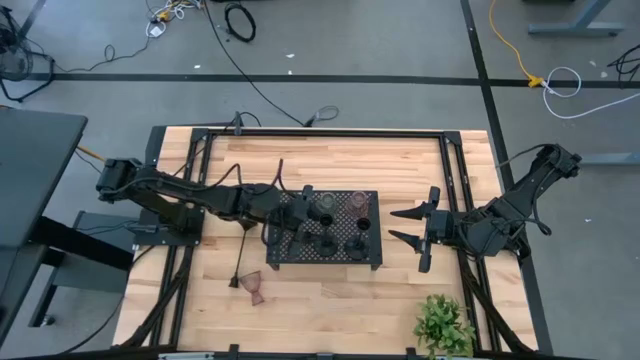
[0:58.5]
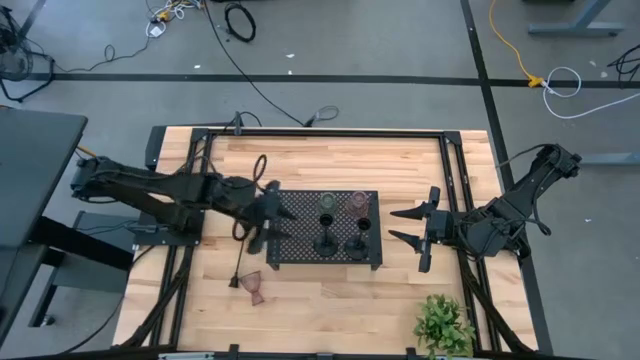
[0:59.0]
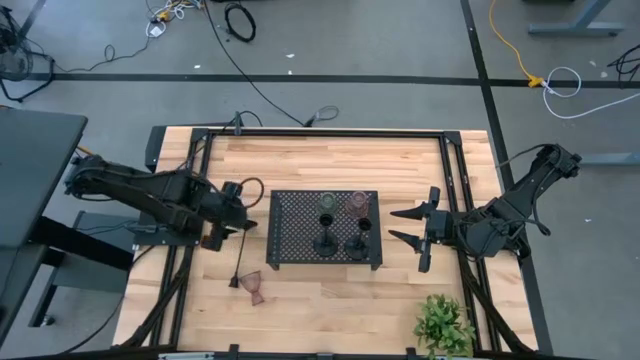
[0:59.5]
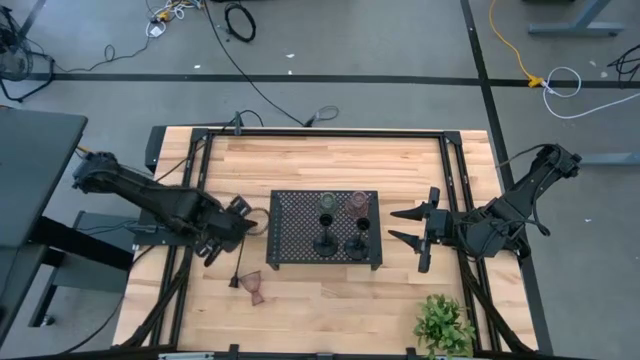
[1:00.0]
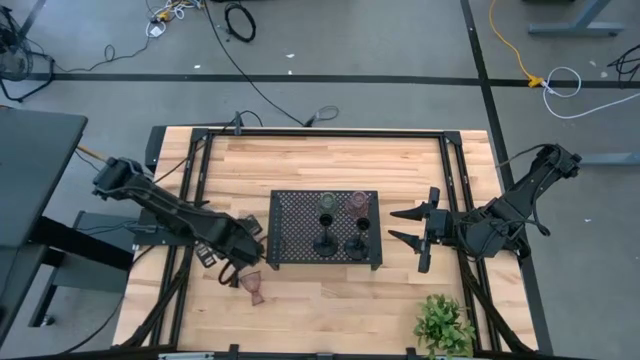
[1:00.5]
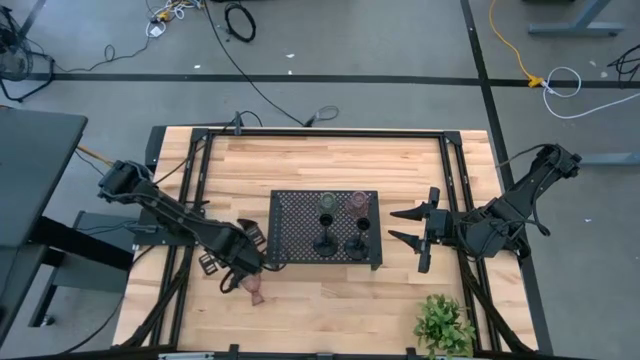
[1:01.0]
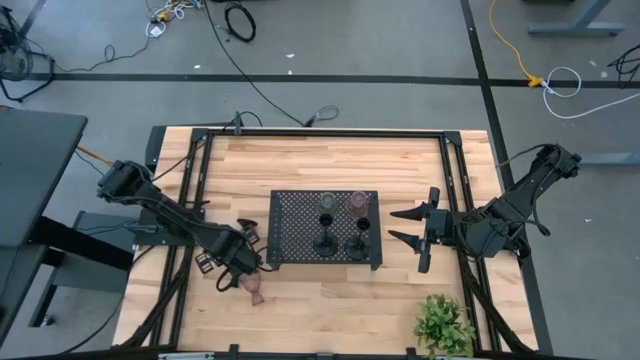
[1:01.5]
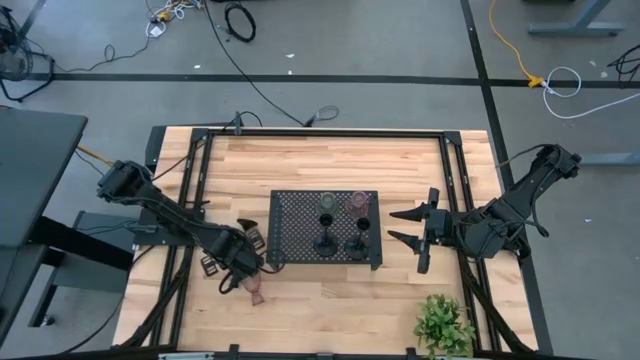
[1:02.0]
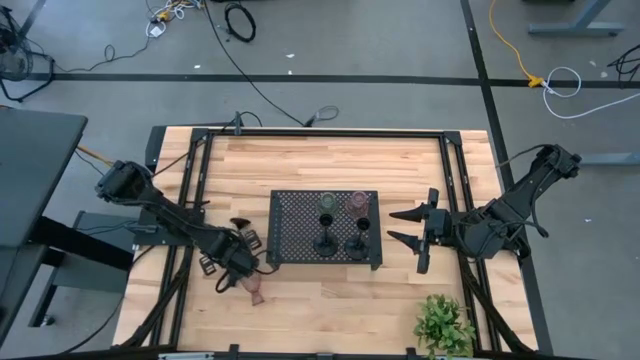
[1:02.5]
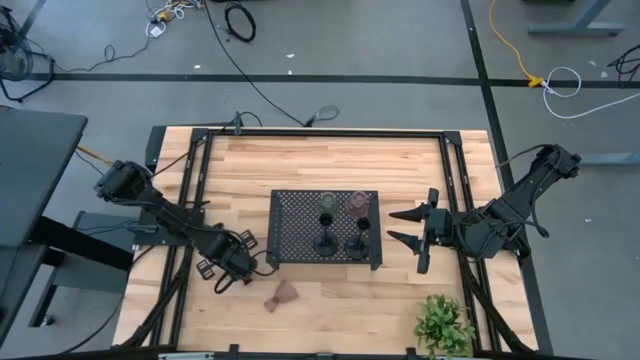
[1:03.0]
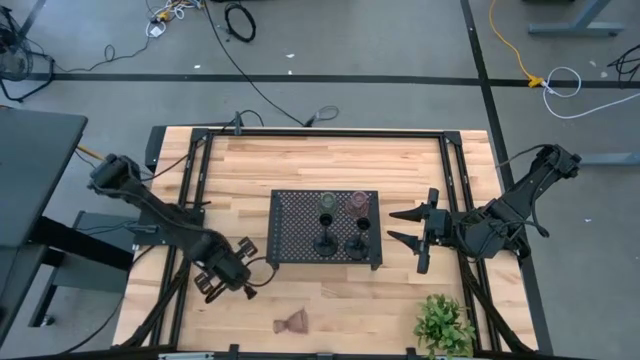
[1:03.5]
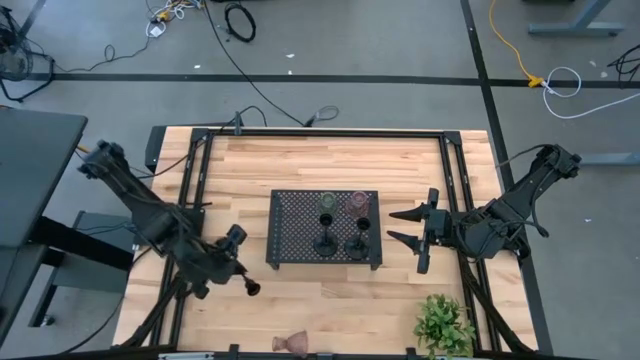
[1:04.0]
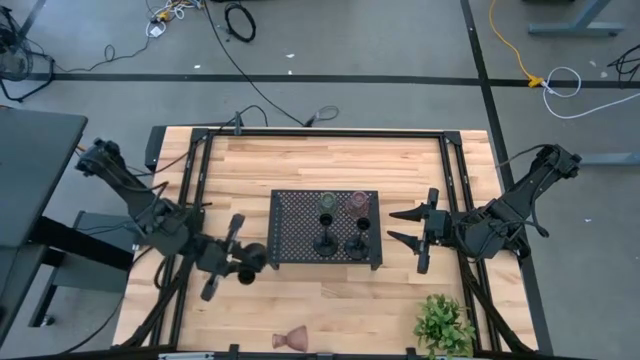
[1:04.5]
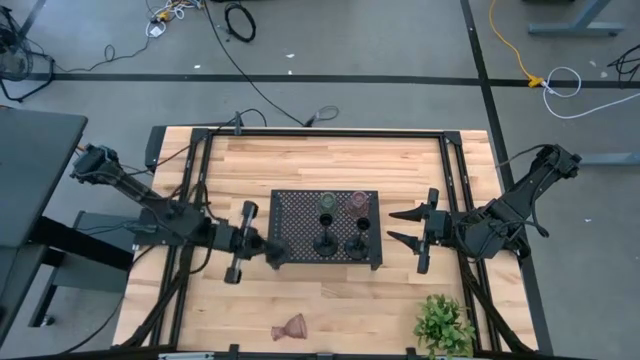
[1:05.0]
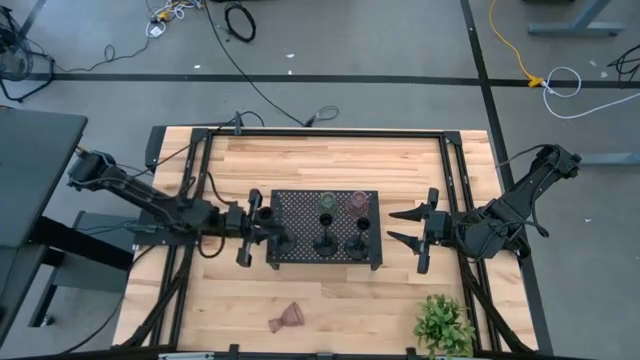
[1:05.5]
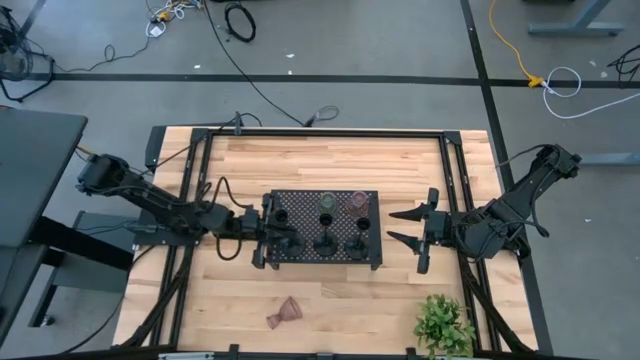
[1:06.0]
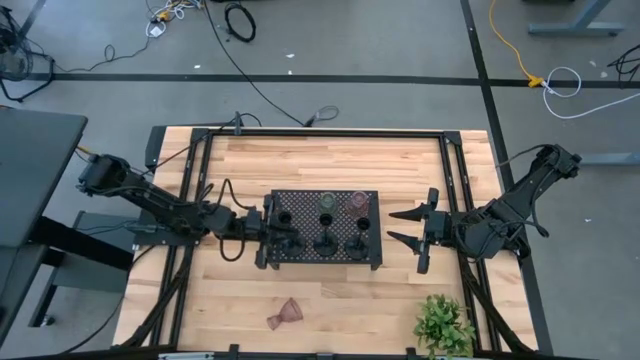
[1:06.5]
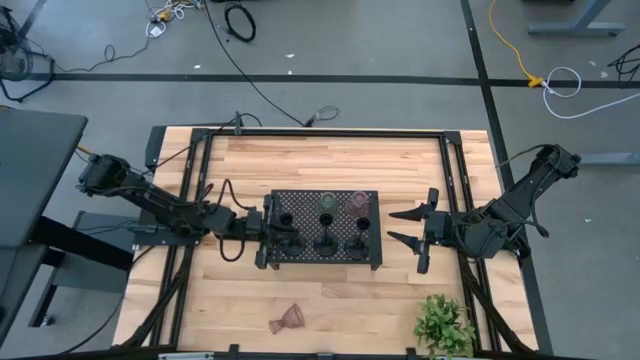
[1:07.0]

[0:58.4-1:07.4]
Task: Pick & Place candle stick holders
Put the black candle holder on the shelf aligned with the other black candle holders

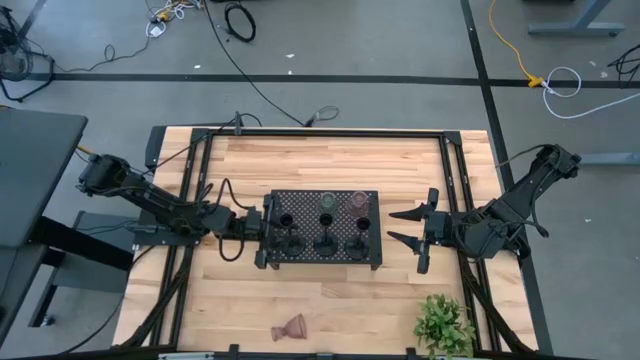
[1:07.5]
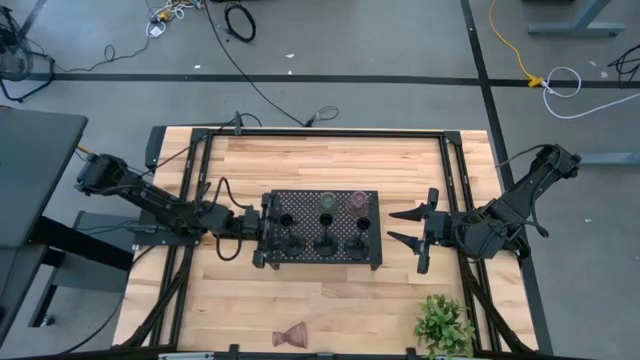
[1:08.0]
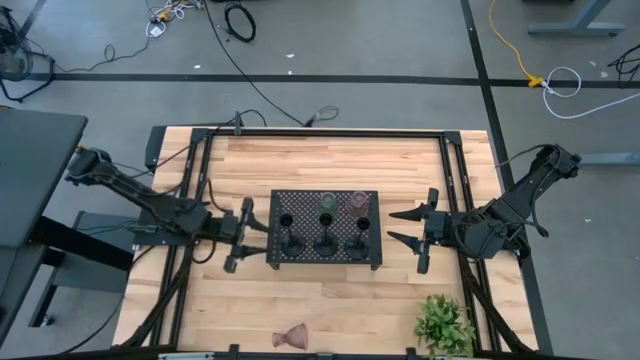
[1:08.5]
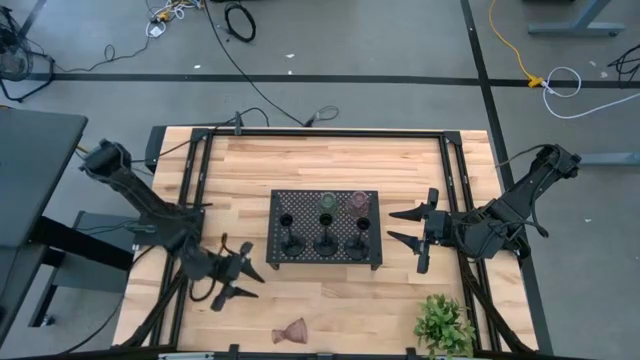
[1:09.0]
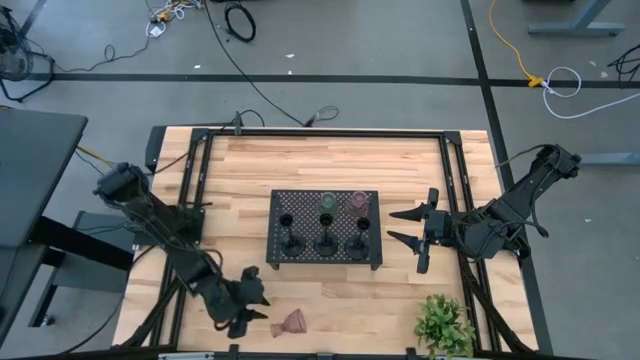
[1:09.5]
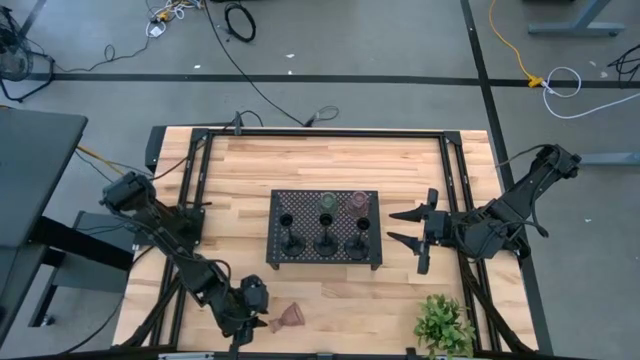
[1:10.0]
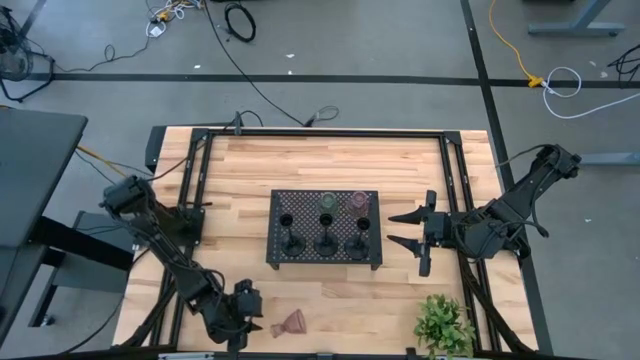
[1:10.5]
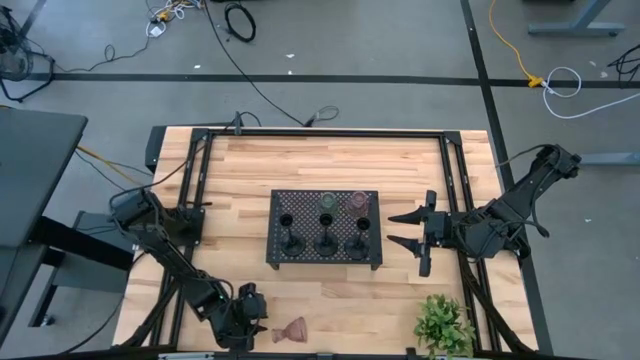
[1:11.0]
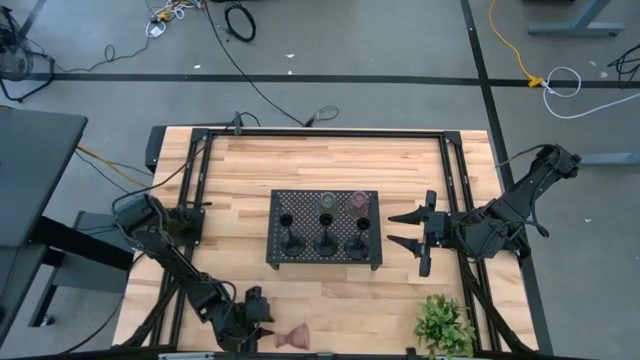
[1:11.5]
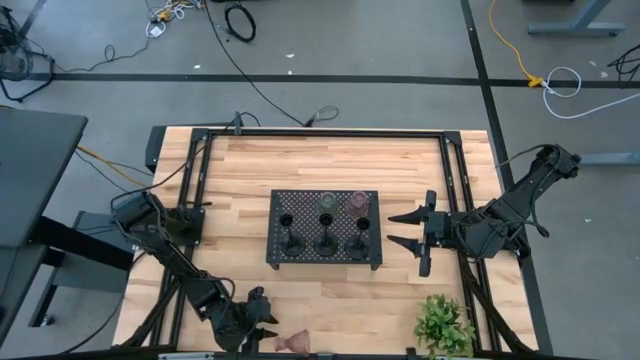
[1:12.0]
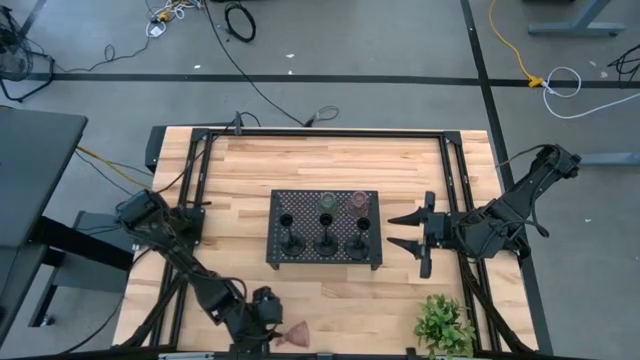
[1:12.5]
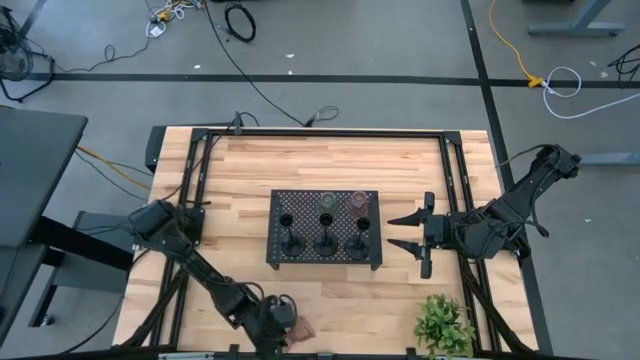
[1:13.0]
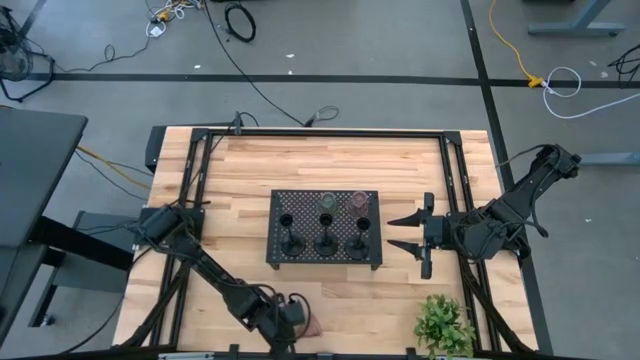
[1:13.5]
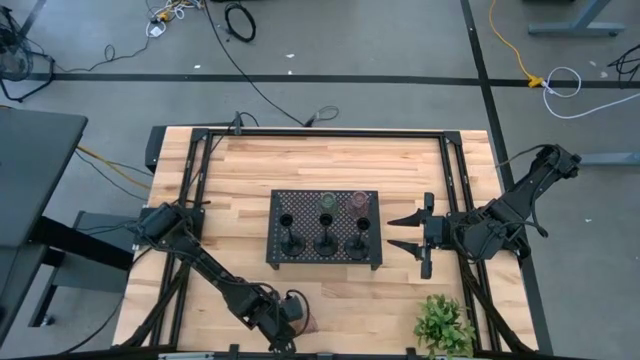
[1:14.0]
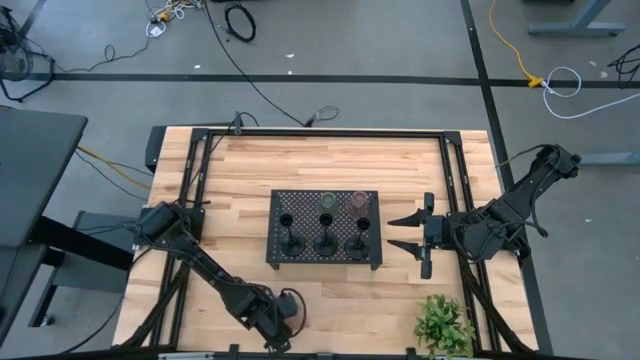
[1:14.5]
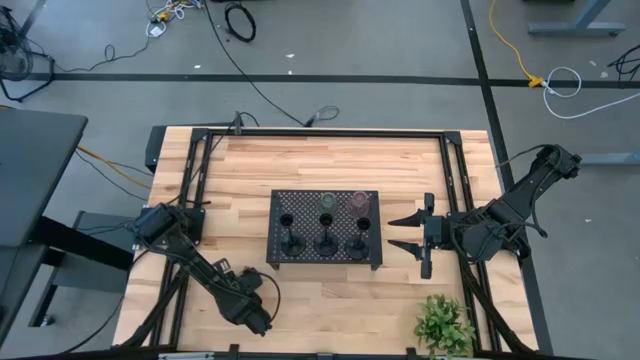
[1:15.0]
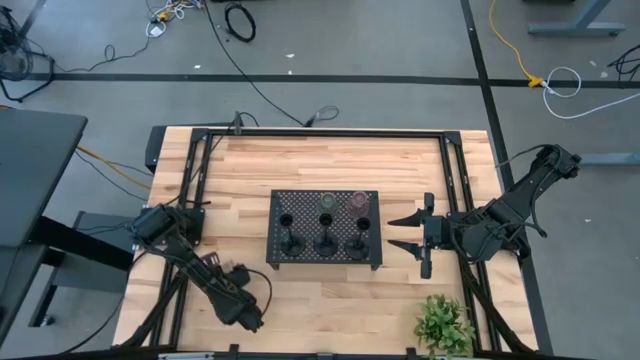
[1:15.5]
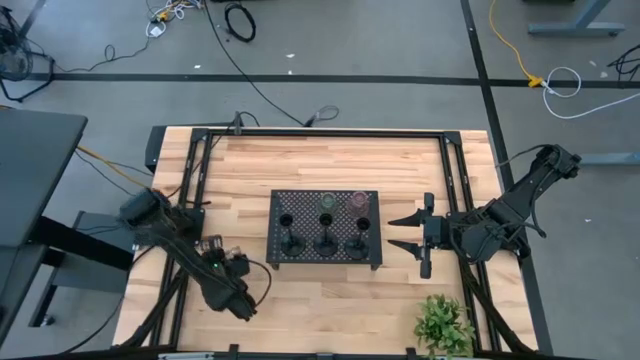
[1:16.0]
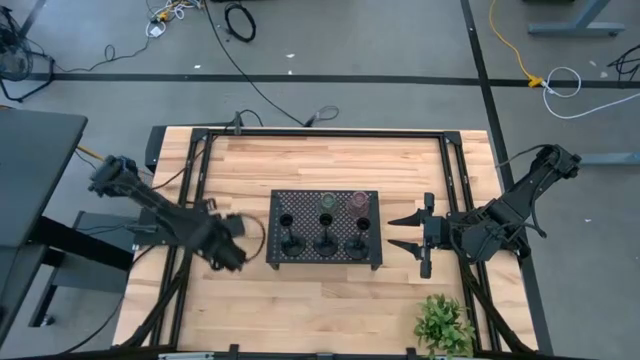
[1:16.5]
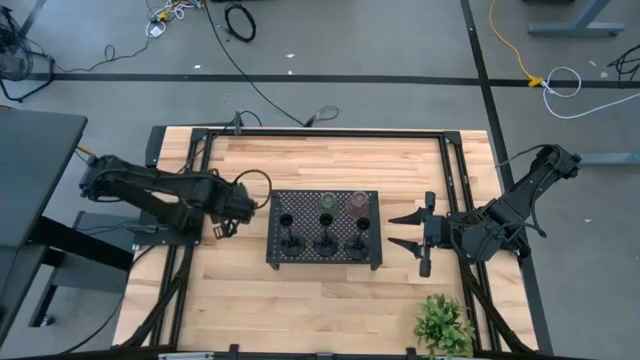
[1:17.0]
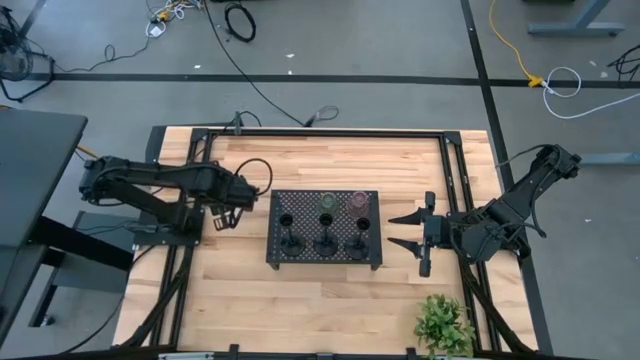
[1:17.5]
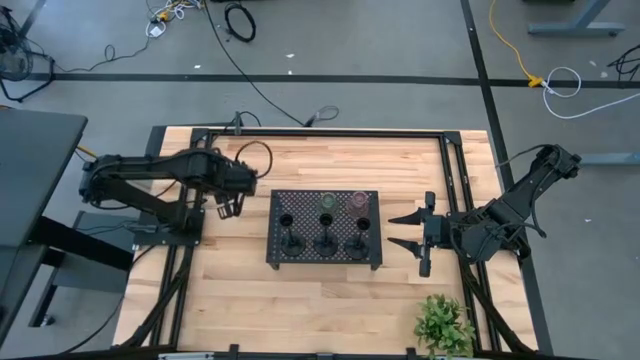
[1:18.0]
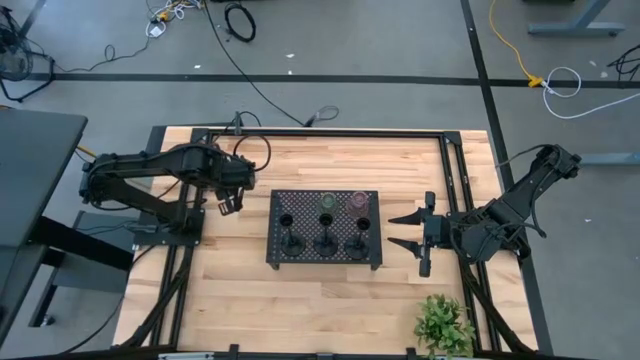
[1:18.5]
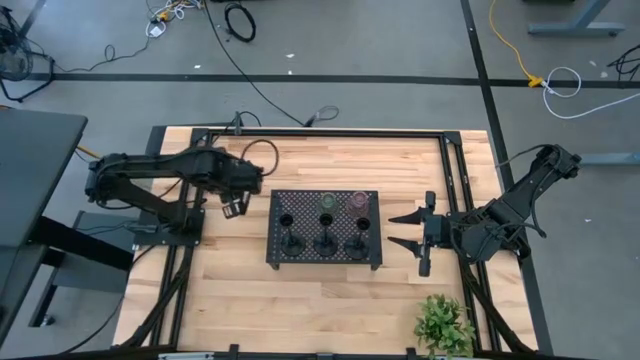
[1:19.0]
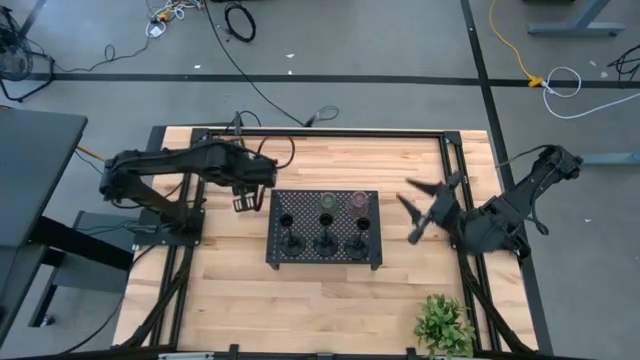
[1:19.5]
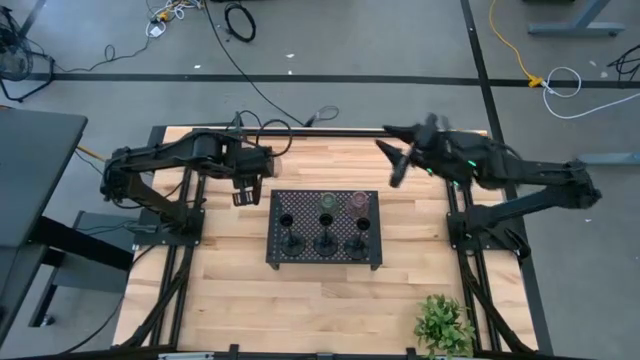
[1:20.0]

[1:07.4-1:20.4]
Put the pink candle holder on the shelf aligned with the candle holders
